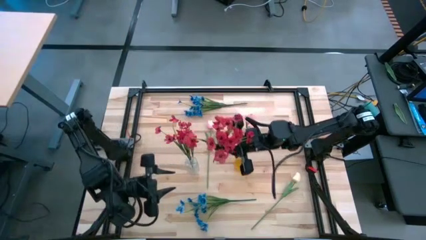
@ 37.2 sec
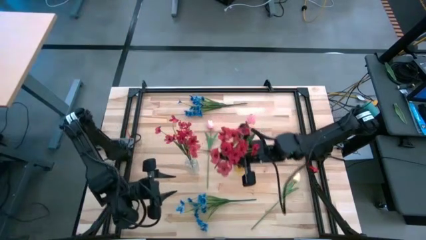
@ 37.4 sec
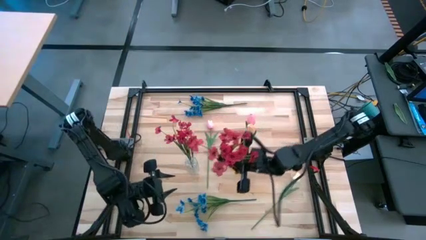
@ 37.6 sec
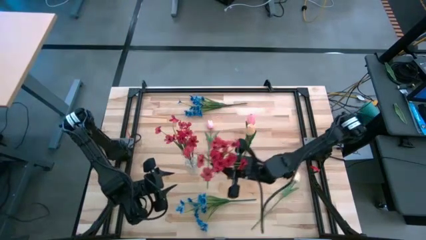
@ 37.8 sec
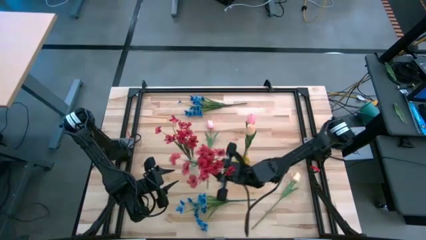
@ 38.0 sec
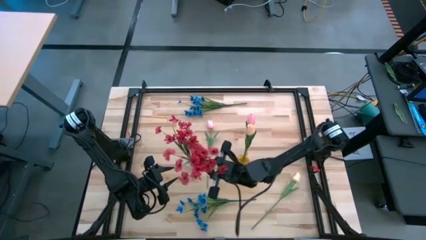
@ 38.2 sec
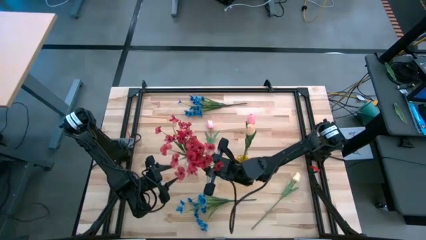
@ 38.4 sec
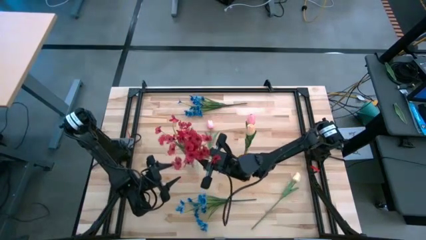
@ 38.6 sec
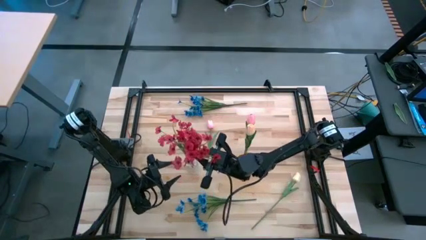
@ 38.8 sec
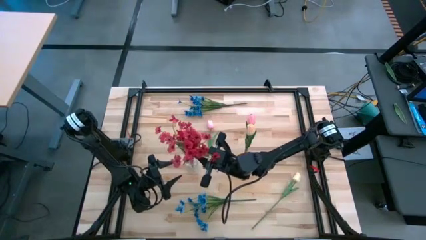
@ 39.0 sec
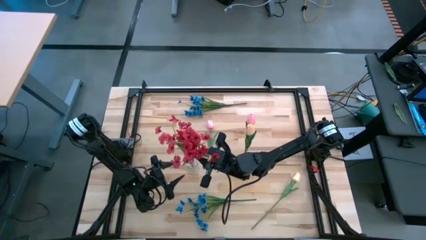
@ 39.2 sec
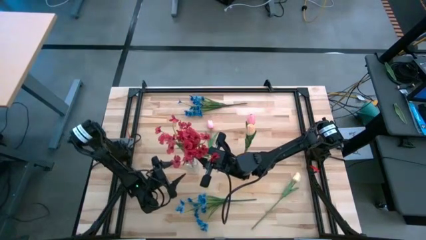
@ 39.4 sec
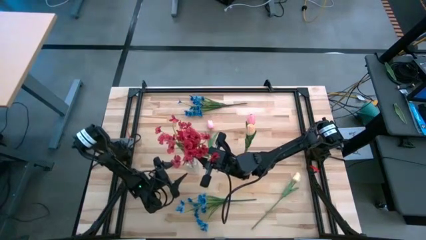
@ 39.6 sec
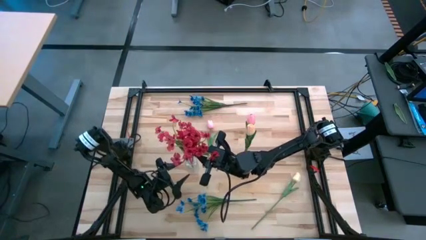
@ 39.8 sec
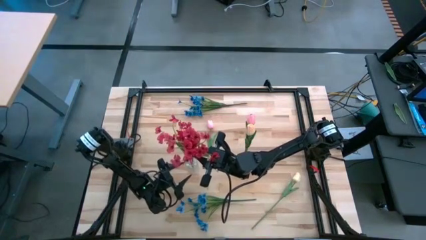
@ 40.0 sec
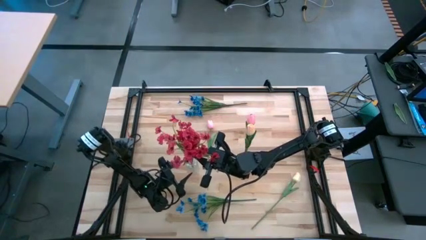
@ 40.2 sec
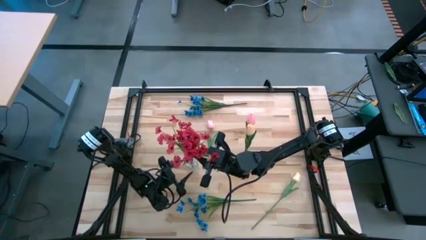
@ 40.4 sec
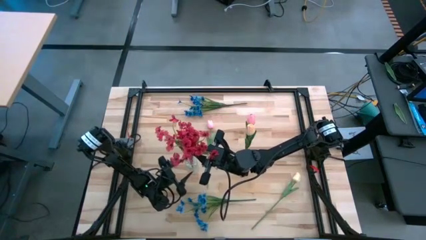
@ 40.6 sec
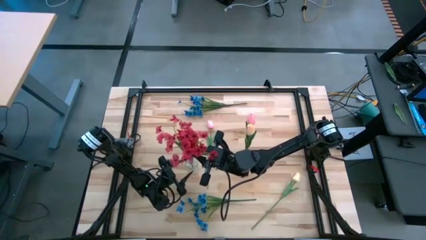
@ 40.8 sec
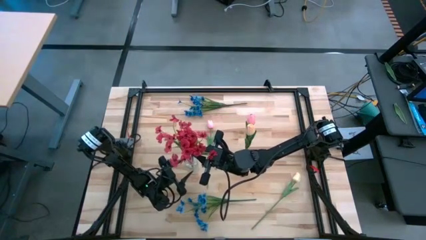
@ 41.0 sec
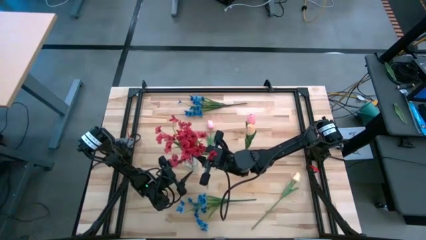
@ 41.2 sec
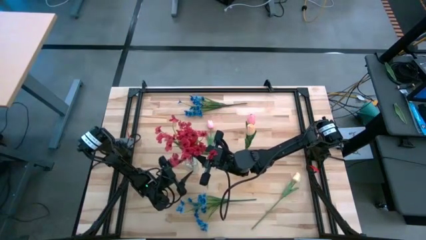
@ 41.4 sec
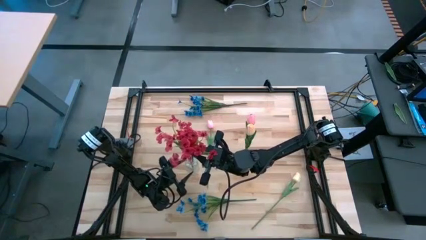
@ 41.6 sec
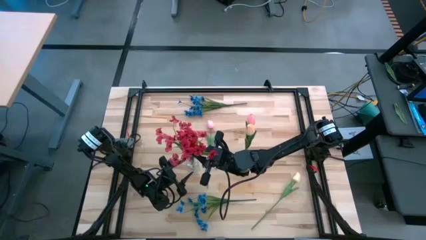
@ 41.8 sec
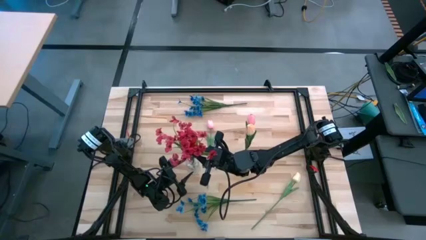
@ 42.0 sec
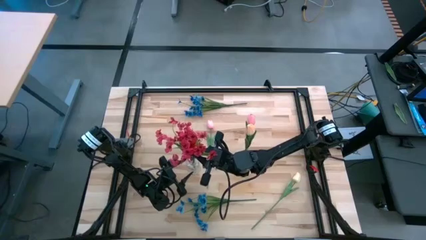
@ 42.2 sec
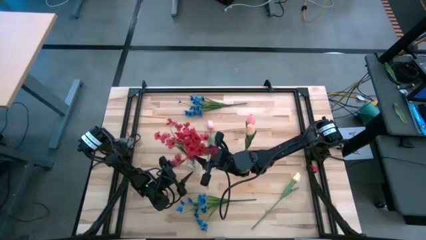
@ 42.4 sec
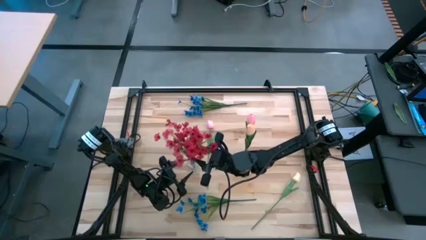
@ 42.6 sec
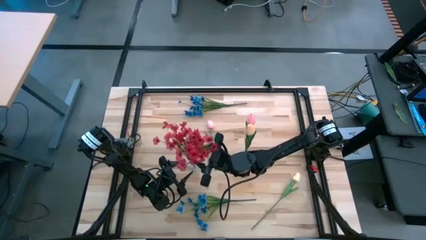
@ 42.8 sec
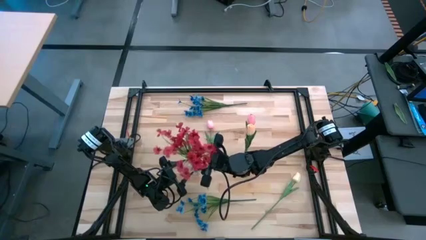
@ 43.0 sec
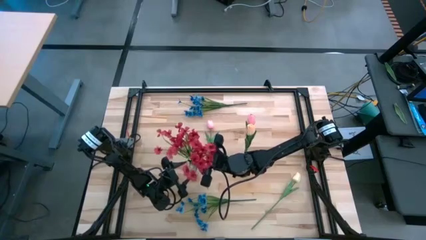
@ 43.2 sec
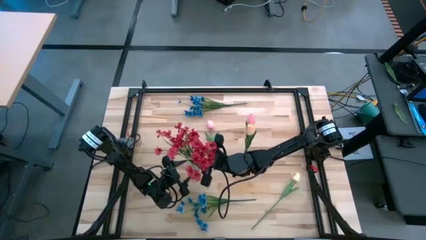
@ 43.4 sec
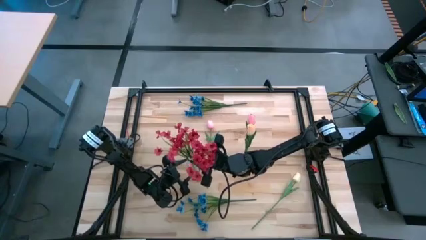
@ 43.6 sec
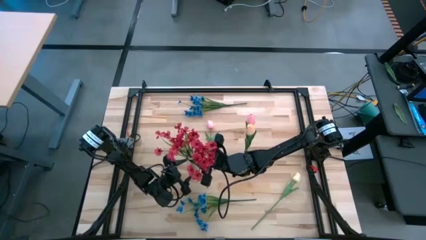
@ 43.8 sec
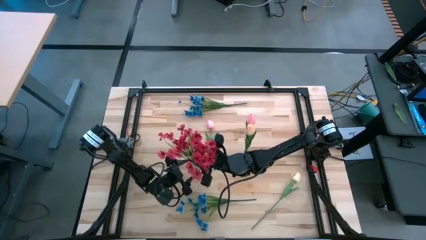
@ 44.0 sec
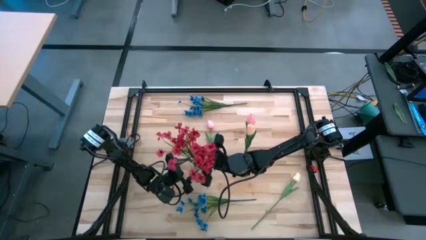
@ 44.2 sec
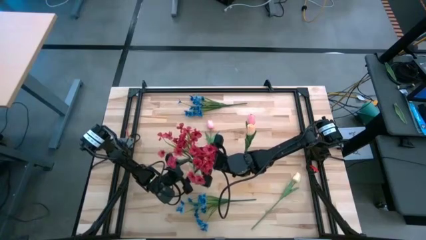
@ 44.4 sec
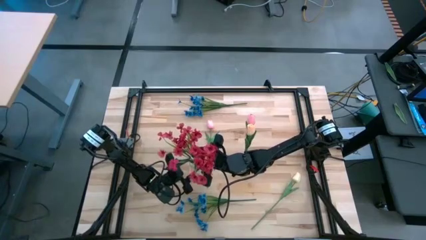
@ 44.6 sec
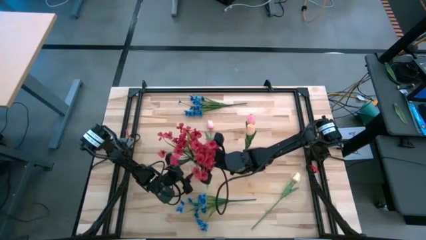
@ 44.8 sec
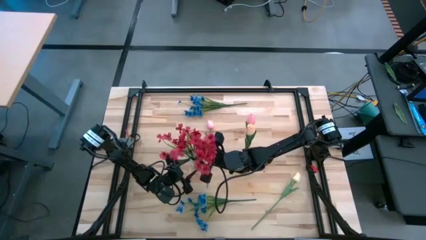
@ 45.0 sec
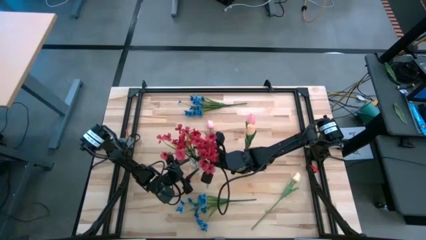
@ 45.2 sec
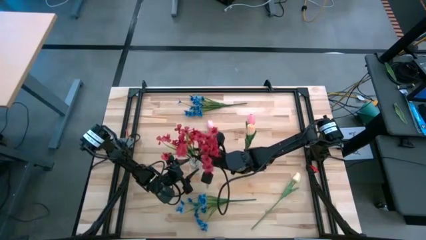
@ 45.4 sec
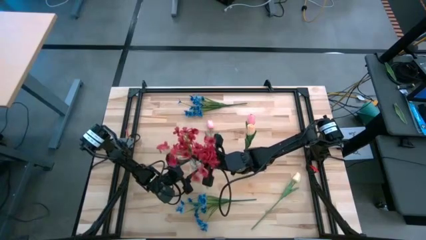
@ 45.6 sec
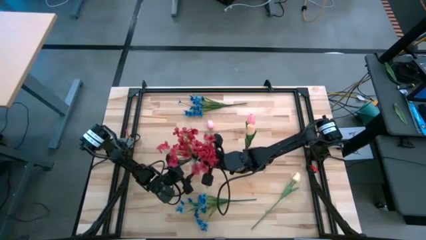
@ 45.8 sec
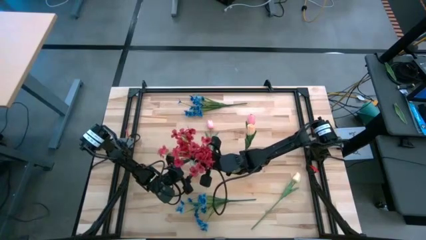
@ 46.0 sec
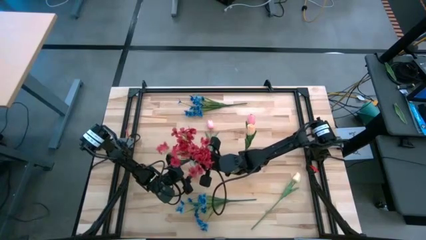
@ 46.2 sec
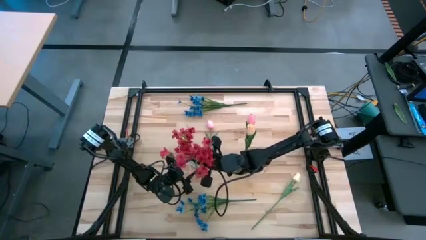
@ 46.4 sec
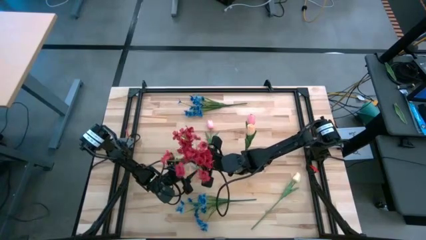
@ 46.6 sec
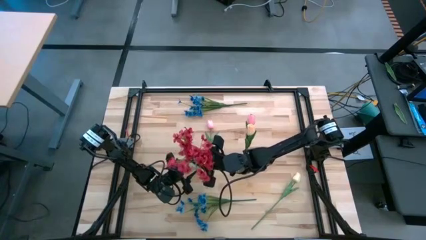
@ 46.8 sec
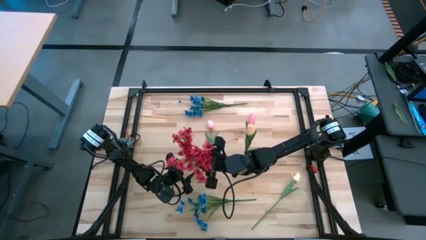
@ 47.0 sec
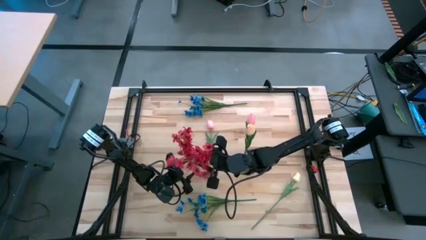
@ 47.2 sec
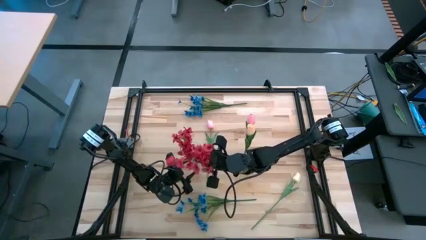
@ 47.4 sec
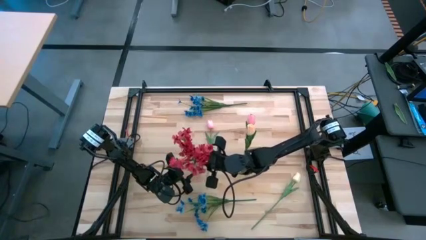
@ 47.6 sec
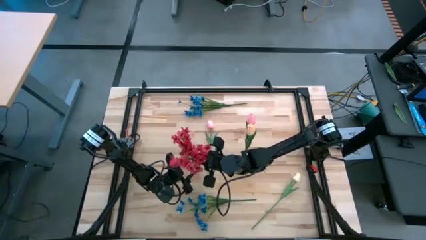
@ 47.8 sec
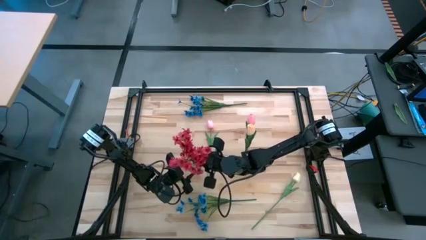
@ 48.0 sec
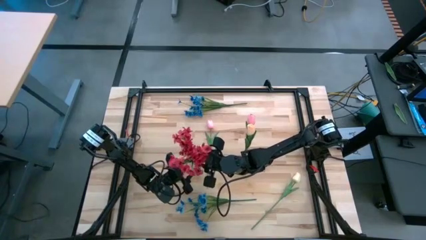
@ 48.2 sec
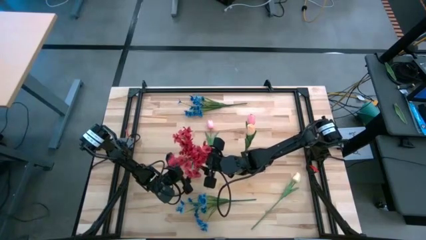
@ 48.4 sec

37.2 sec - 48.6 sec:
Task: Sort flowers into vase by color
Put the red flower into the transparent vase

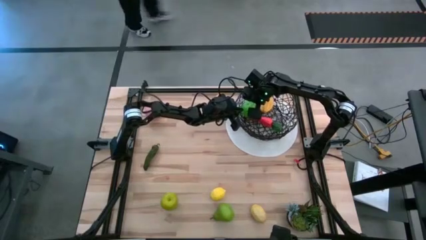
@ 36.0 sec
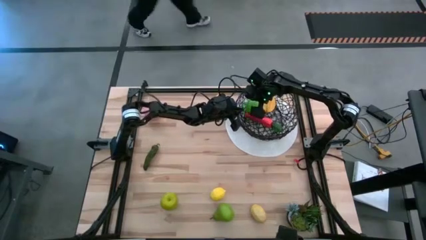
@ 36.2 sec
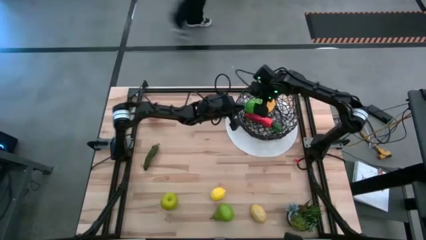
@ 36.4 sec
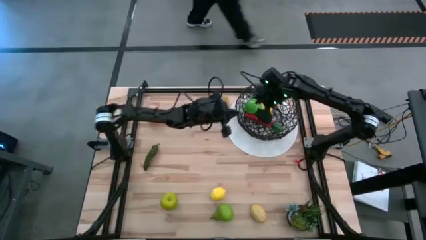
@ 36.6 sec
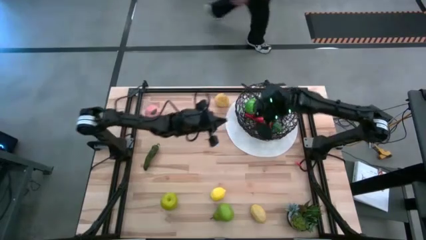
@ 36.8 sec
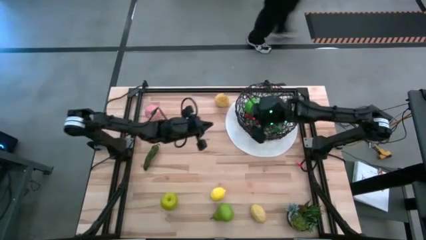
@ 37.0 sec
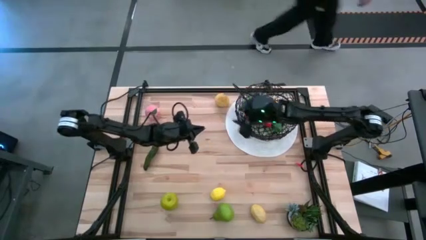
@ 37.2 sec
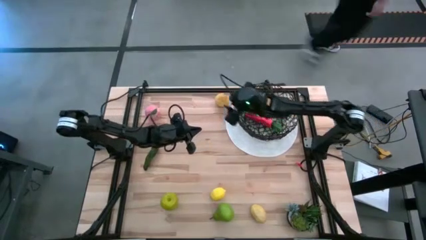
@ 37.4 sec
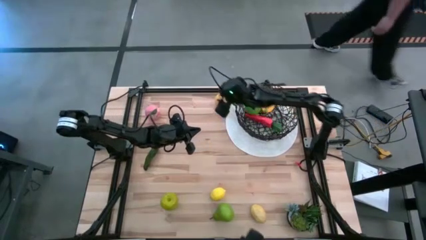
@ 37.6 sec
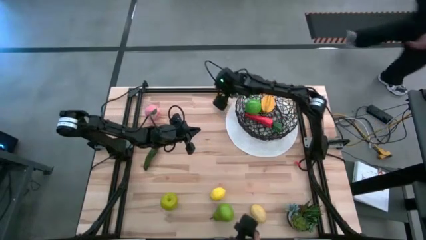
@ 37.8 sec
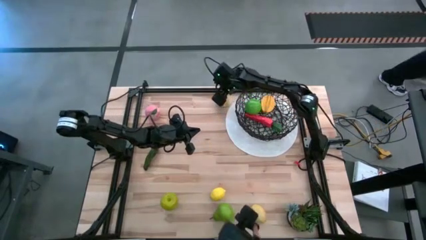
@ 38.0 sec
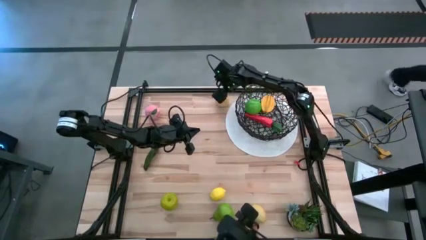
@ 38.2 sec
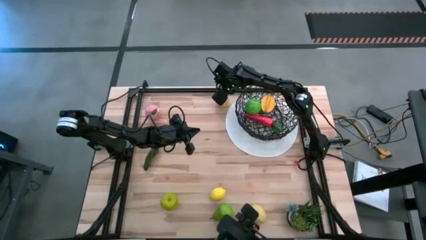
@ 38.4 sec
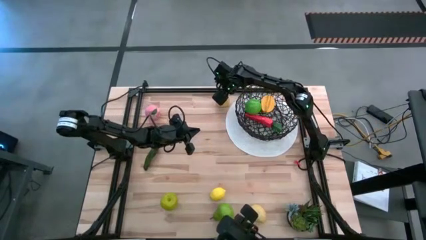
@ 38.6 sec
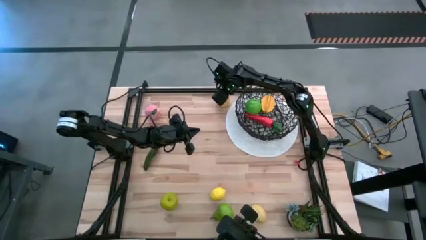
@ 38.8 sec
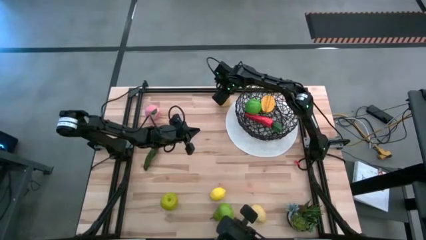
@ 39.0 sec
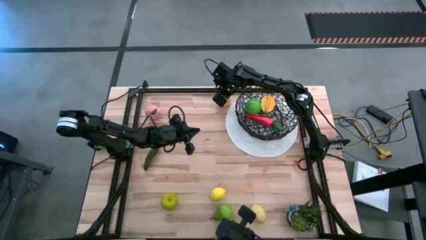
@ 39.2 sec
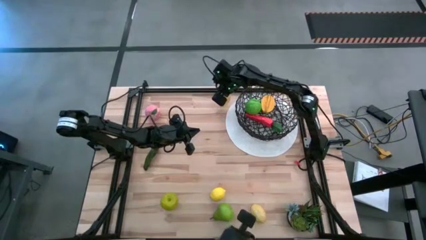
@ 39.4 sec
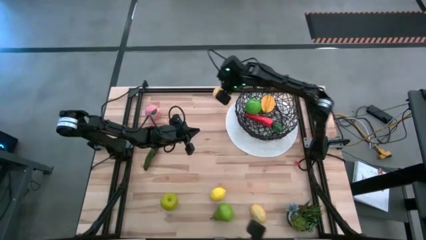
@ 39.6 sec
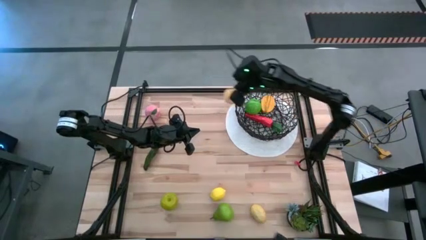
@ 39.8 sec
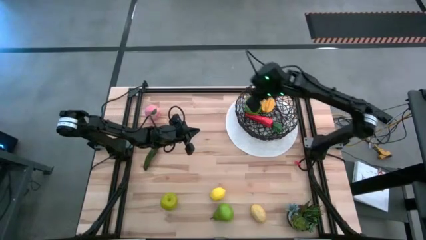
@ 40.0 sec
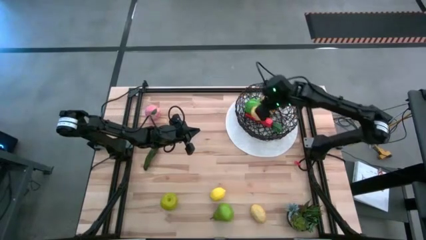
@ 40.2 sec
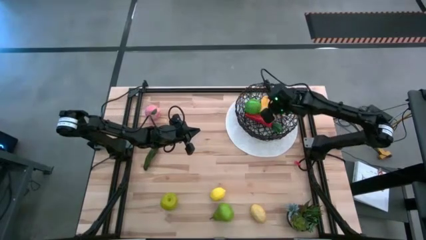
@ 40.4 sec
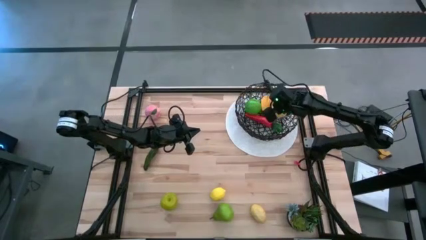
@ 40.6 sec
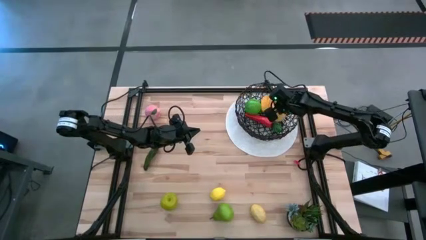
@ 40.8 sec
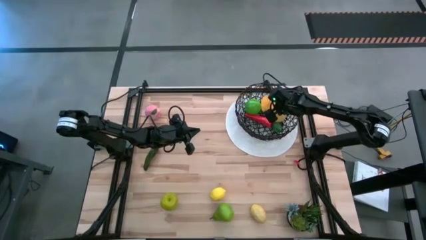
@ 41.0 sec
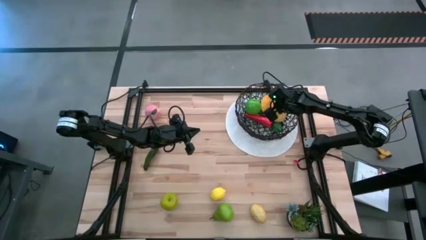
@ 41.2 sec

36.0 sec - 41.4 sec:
Task: Build produce basket
Put the yellow pear into the black wire basket
